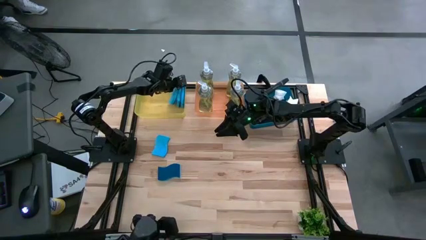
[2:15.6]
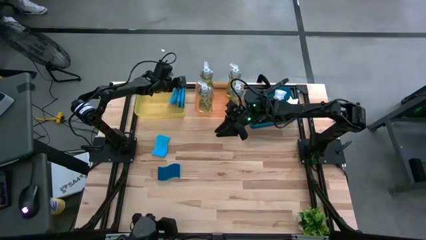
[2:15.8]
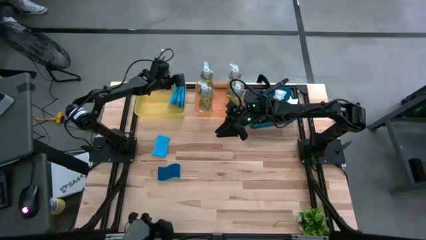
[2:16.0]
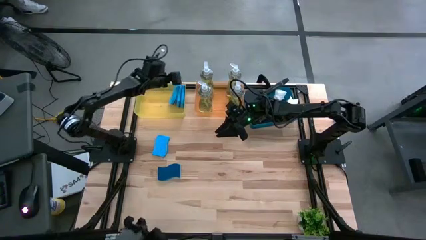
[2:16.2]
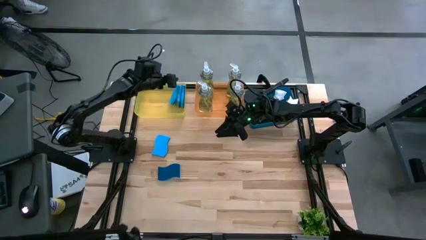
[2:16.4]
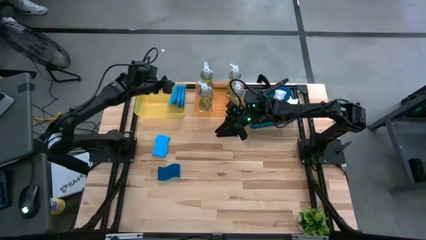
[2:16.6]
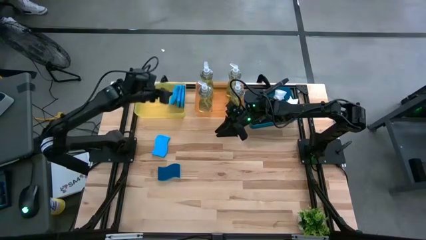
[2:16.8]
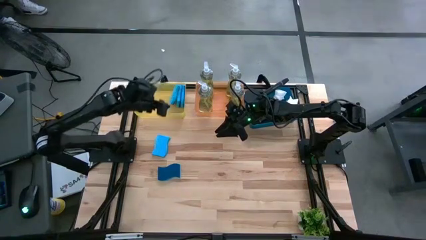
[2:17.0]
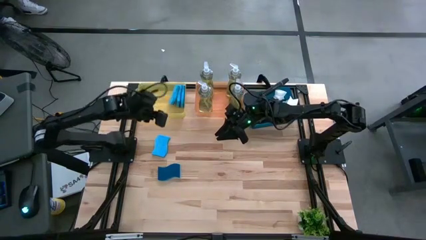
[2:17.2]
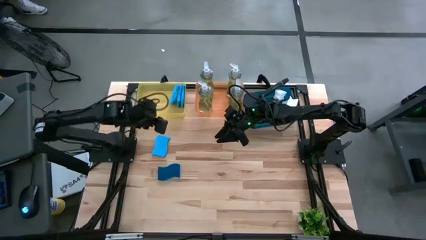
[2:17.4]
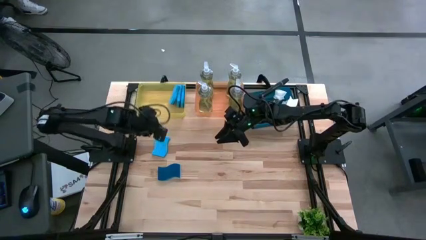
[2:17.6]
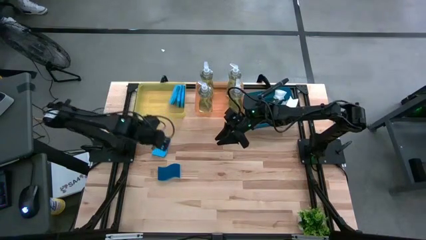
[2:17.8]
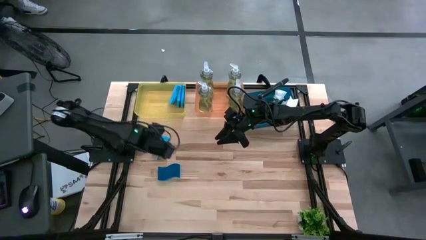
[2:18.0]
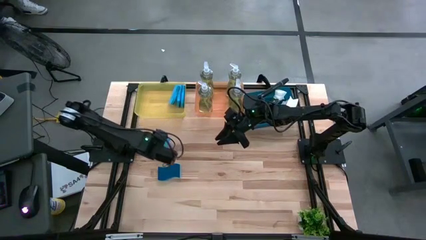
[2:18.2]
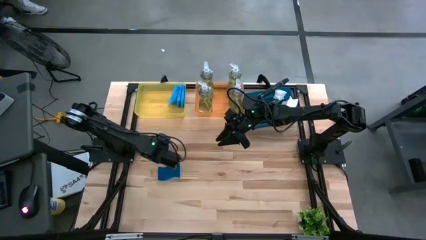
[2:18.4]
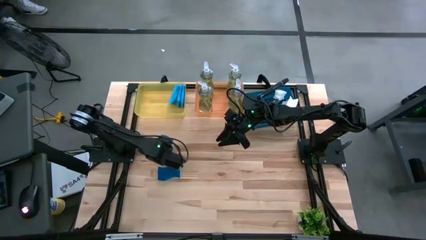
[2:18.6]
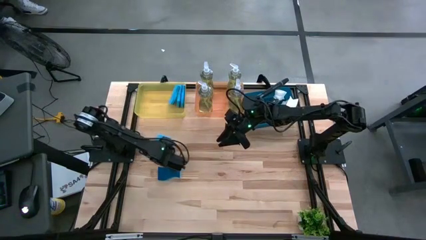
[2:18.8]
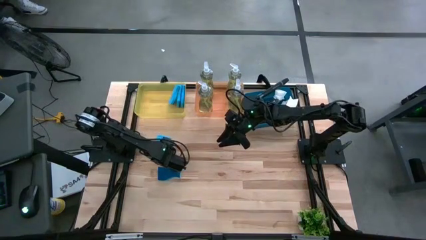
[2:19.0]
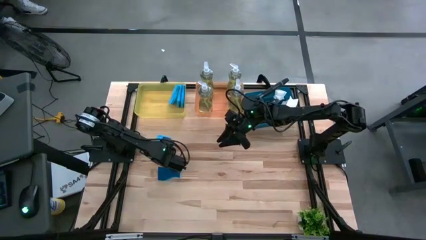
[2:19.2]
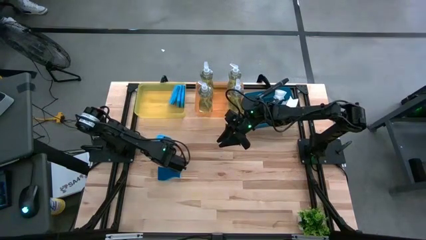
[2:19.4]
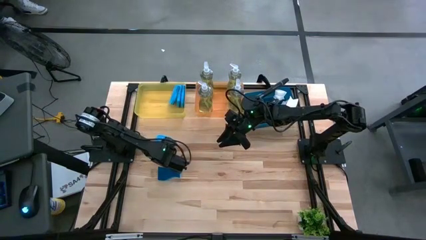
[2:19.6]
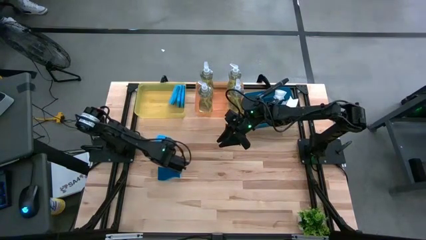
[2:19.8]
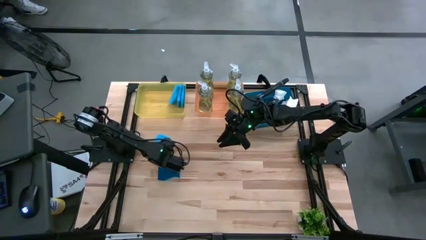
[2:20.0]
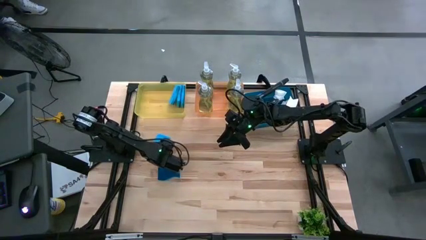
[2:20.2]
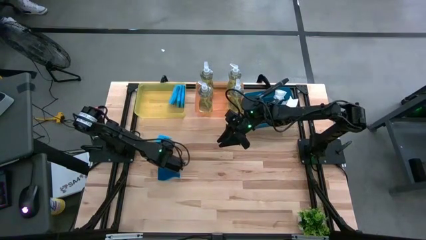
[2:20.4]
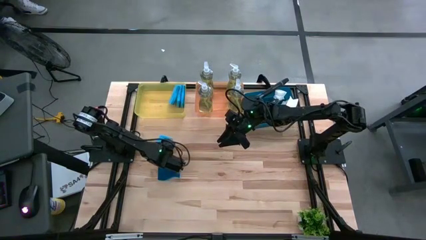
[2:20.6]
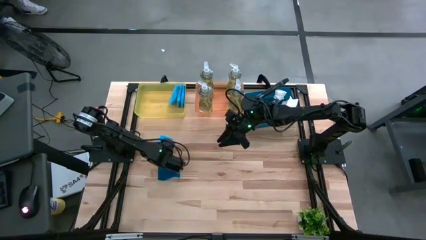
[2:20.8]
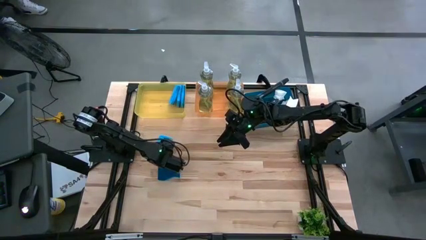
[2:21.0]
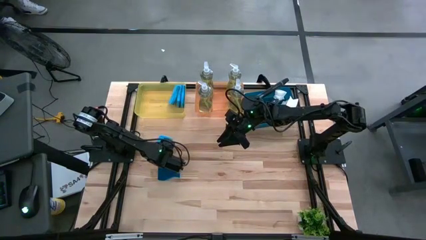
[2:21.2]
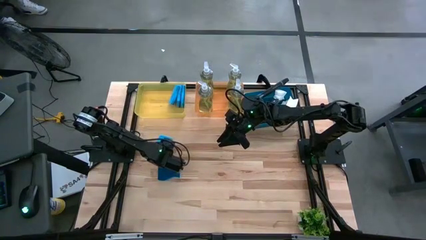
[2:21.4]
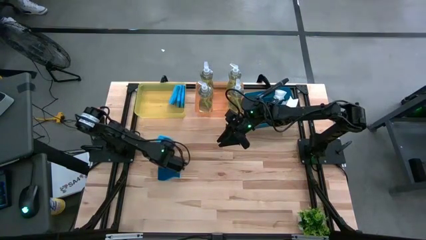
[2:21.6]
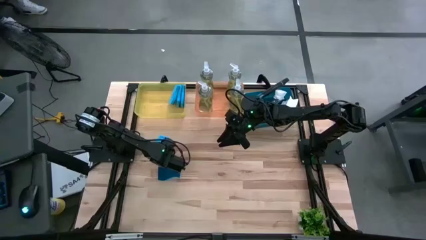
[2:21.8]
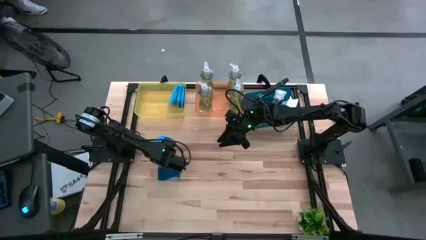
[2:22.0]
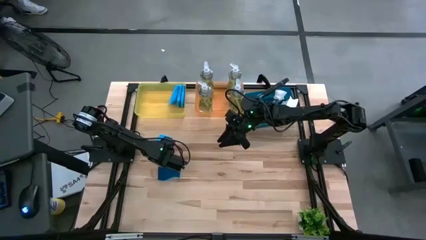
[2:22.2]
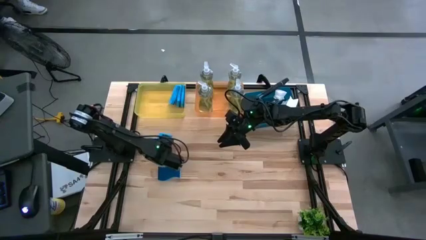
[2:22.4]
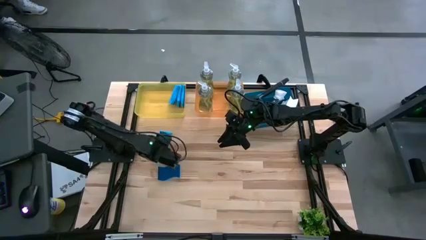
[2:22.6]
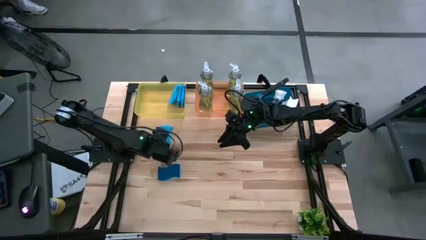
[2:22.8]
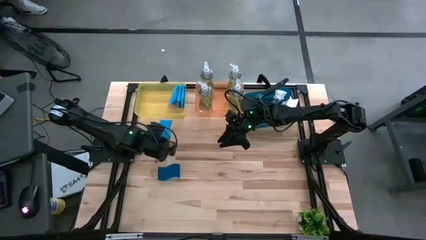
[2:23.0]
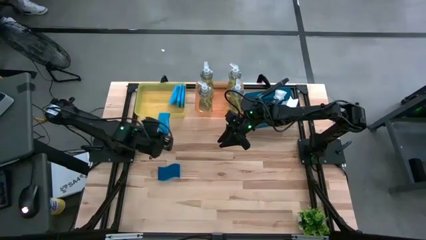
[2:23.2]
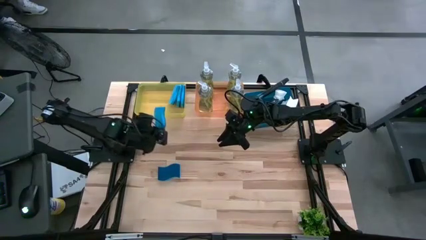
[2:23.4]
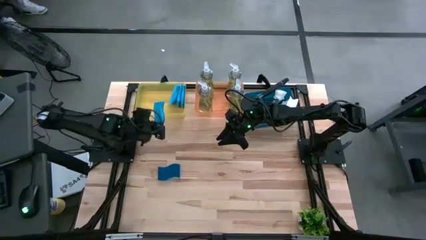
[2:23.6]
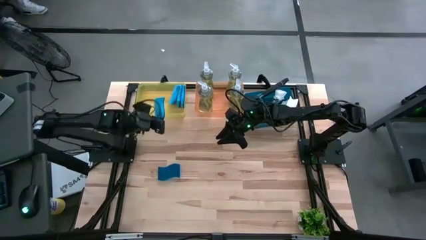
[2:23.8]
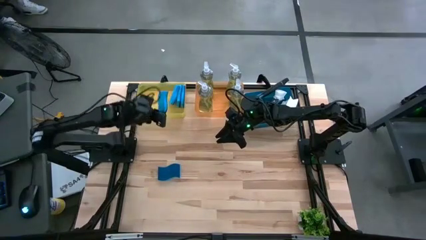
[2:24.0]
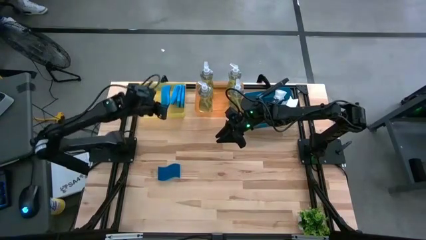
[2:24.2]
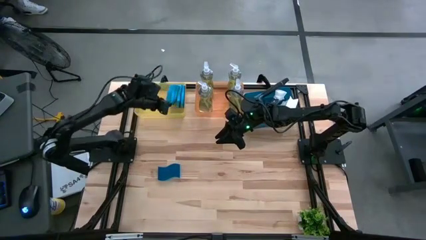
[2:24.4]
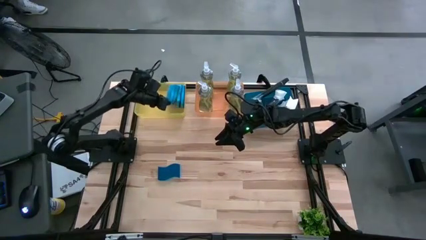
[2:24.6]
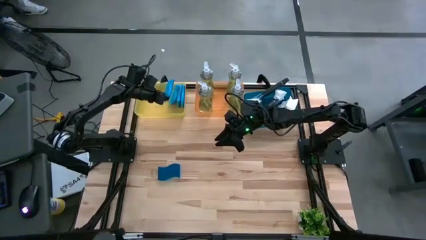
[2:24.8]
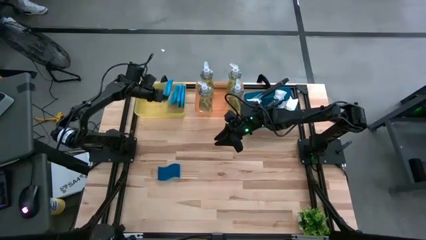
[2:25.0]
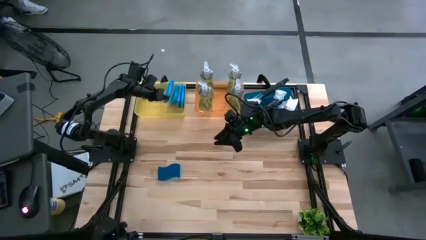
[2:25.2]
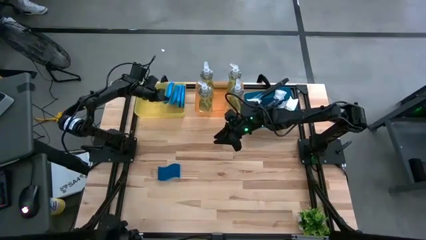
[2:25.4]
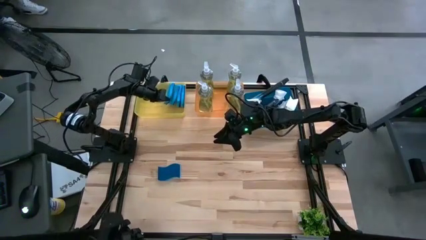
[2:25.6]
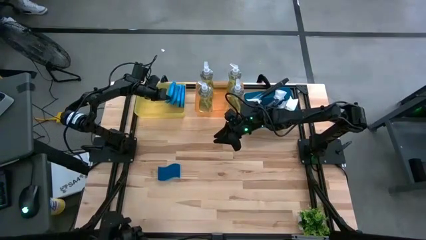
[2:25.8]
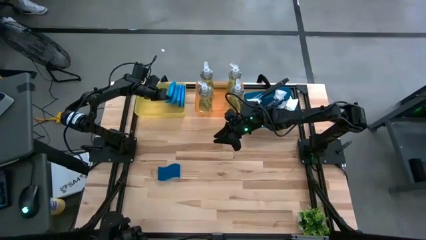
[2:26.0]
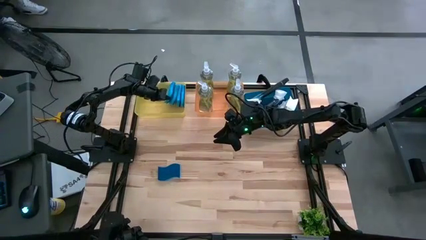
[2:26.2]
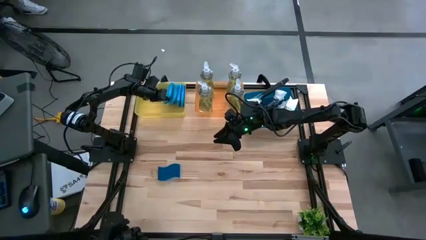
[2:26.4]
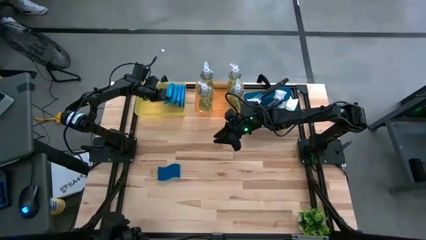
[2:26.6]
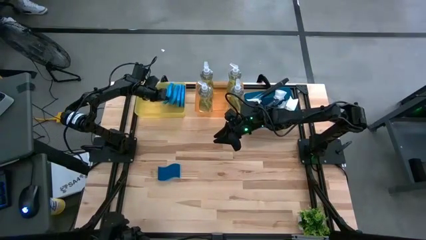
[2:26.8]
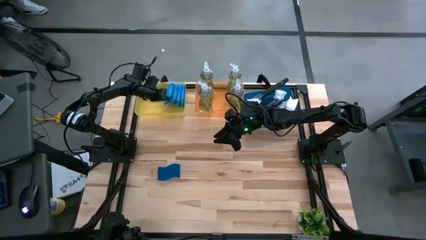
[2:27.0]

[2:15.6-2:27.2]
Task: Pick & Place Kitchen Sink Supplies
Put the blue sponge into the yellow bin
